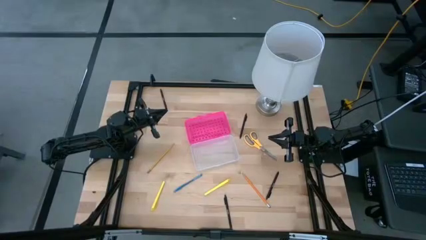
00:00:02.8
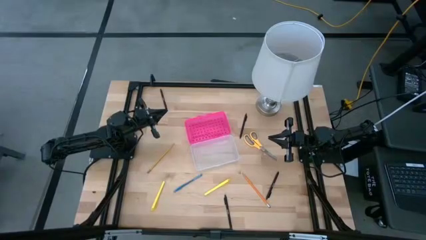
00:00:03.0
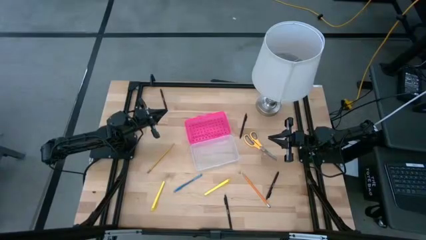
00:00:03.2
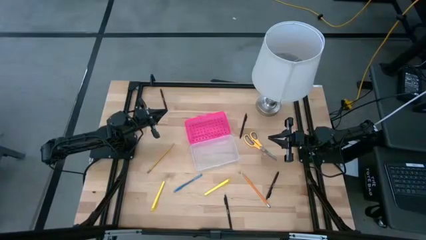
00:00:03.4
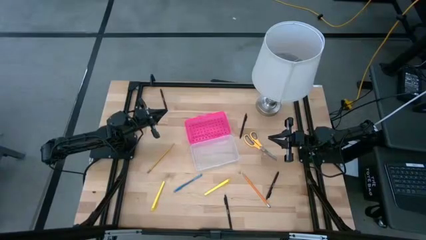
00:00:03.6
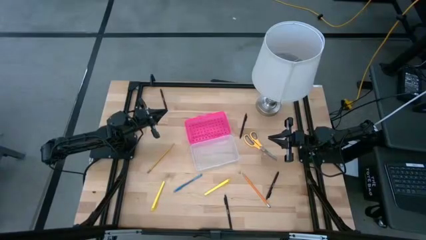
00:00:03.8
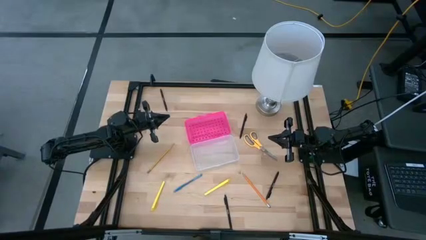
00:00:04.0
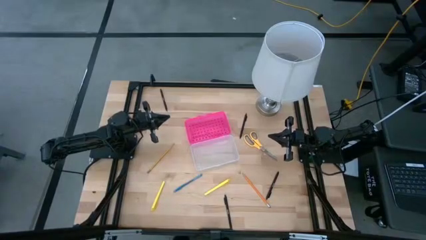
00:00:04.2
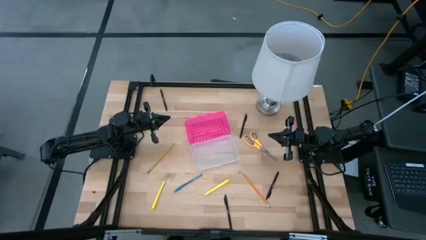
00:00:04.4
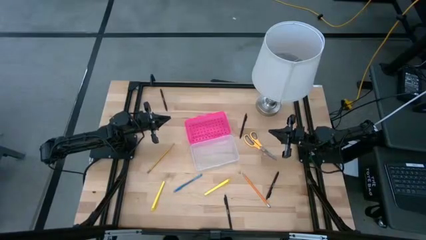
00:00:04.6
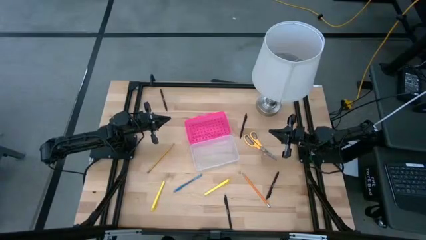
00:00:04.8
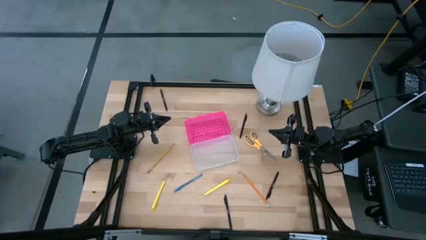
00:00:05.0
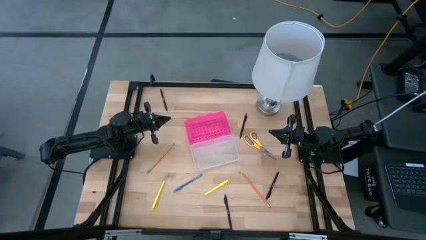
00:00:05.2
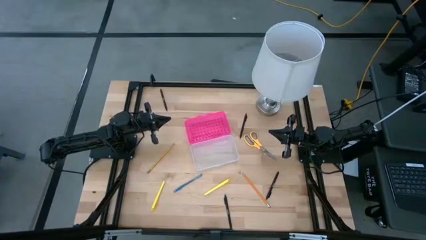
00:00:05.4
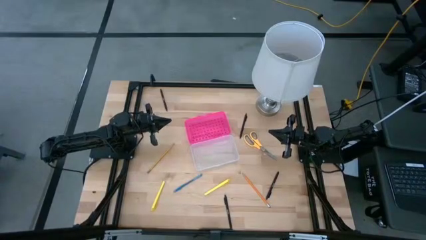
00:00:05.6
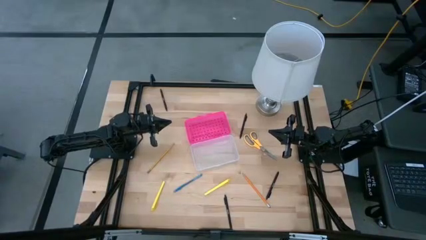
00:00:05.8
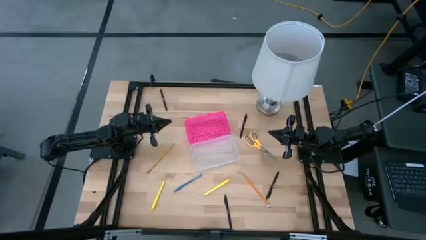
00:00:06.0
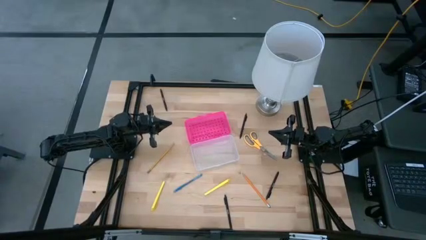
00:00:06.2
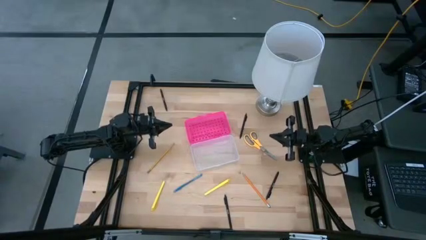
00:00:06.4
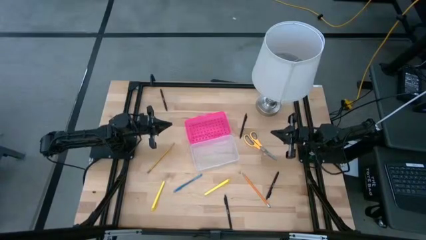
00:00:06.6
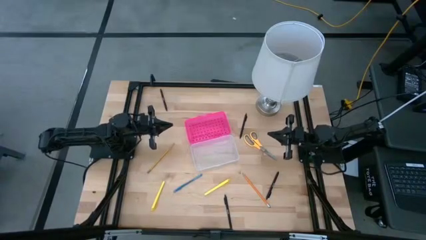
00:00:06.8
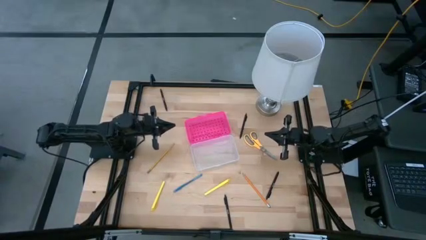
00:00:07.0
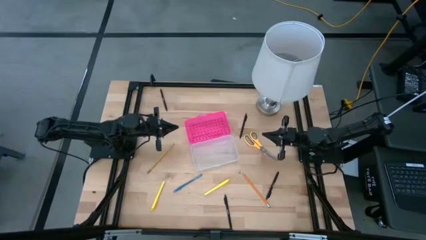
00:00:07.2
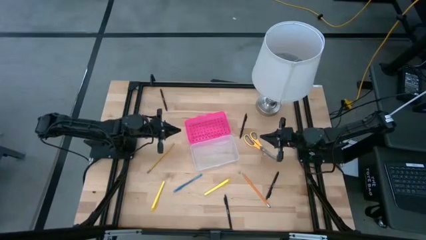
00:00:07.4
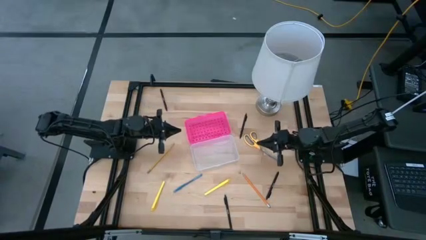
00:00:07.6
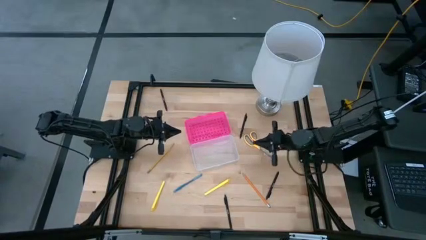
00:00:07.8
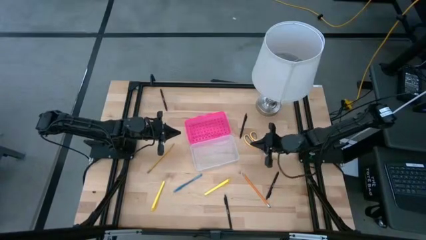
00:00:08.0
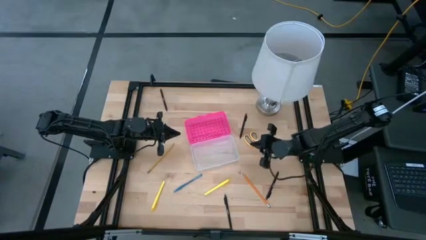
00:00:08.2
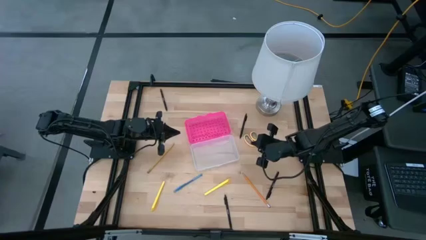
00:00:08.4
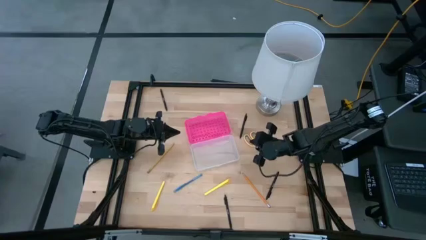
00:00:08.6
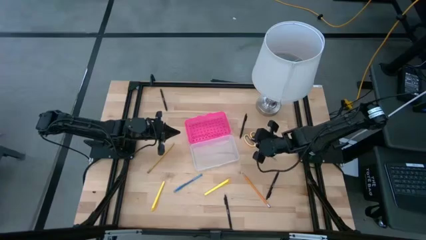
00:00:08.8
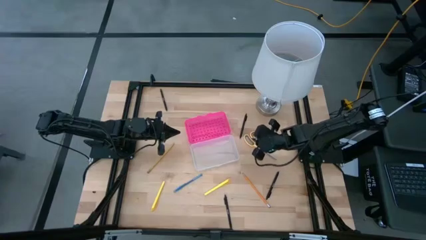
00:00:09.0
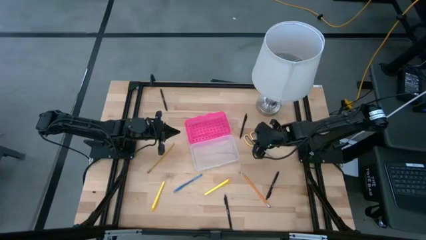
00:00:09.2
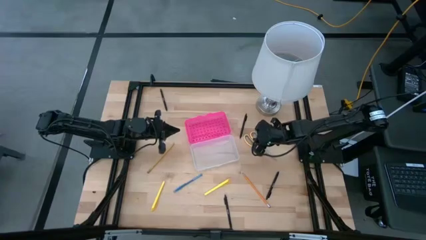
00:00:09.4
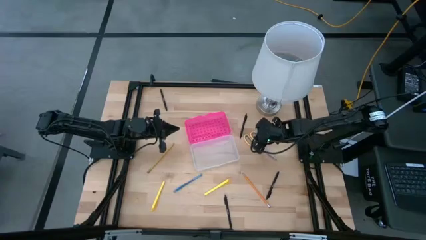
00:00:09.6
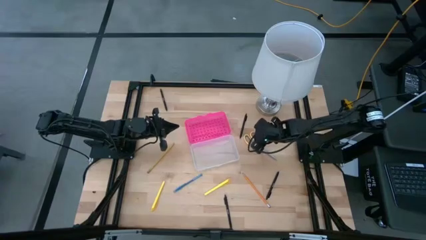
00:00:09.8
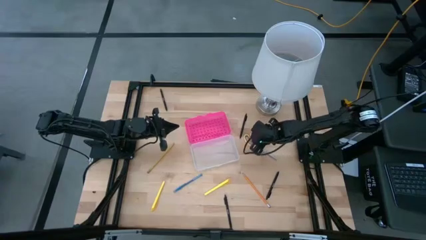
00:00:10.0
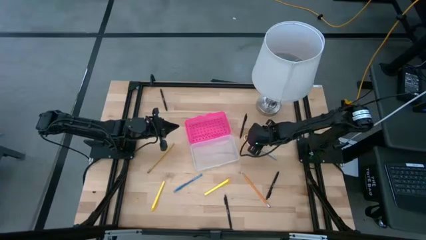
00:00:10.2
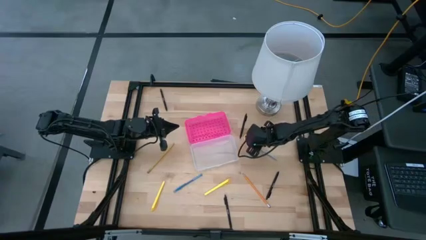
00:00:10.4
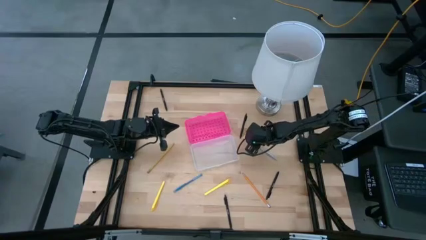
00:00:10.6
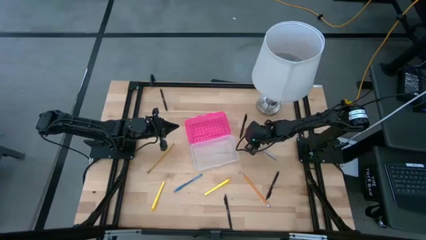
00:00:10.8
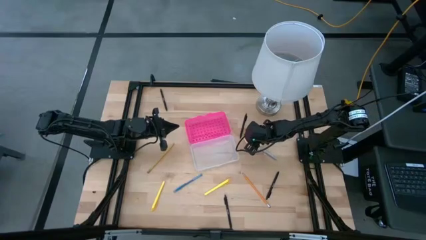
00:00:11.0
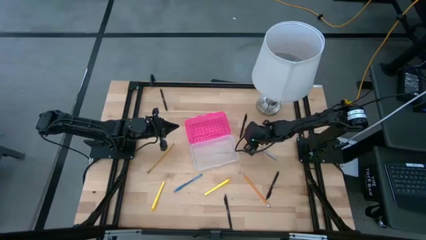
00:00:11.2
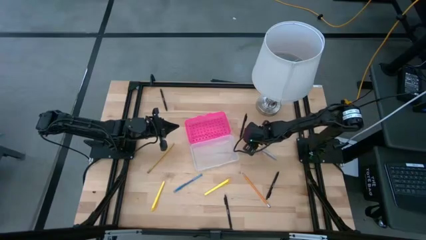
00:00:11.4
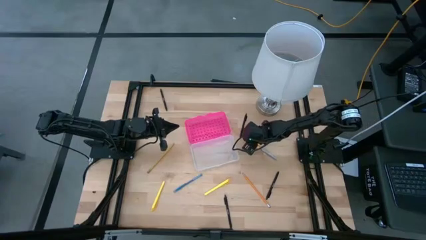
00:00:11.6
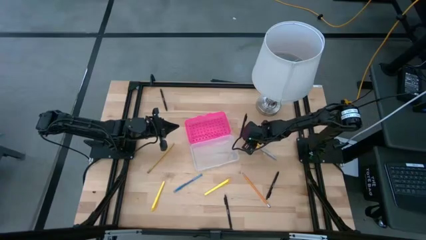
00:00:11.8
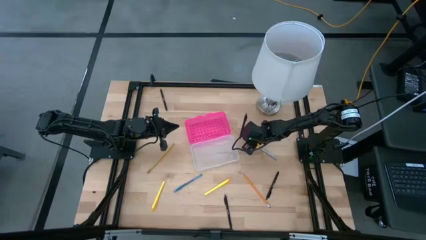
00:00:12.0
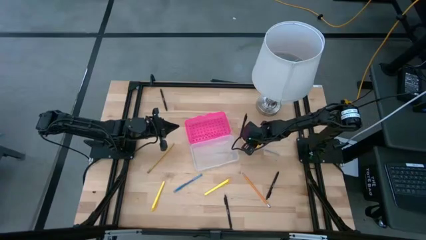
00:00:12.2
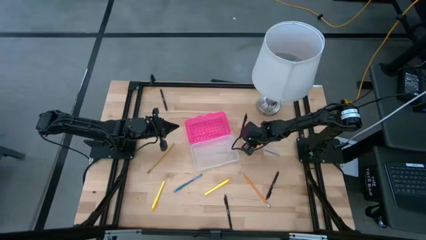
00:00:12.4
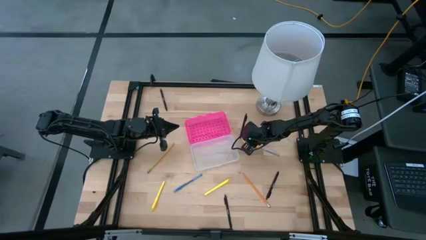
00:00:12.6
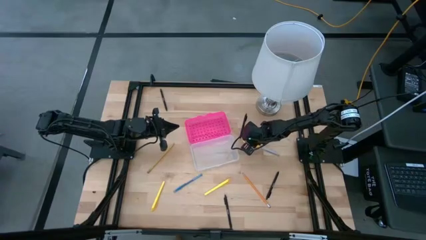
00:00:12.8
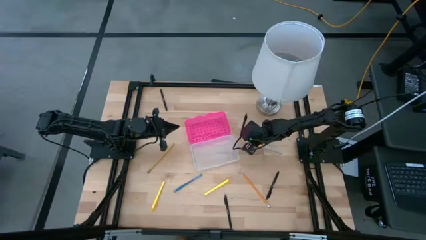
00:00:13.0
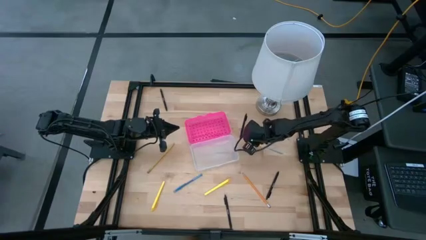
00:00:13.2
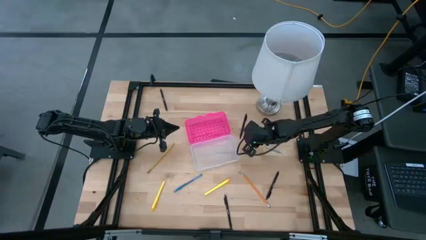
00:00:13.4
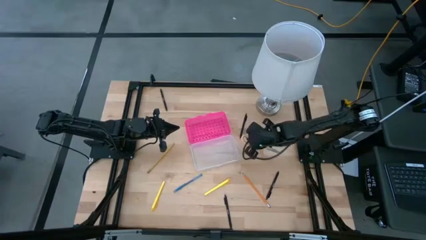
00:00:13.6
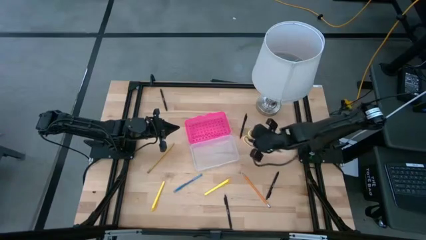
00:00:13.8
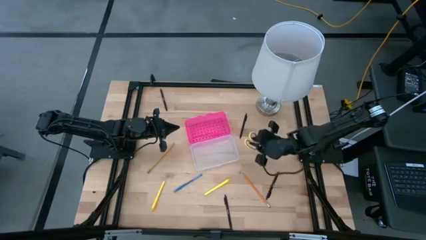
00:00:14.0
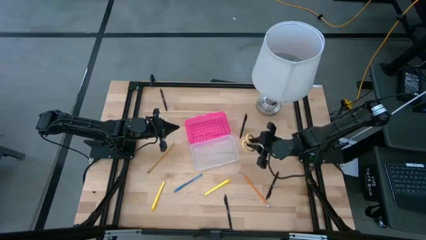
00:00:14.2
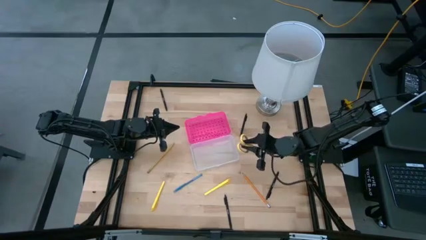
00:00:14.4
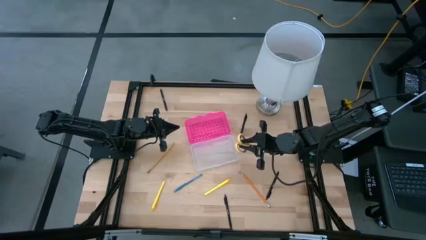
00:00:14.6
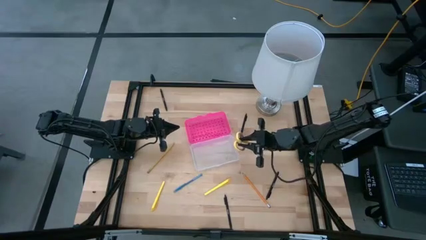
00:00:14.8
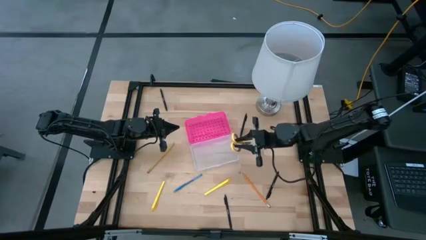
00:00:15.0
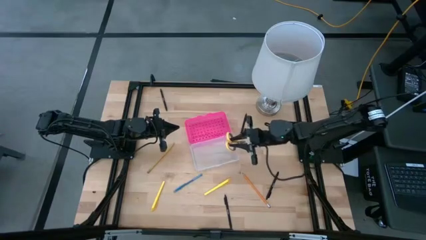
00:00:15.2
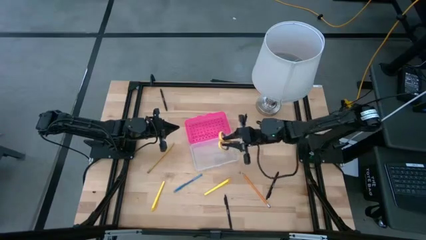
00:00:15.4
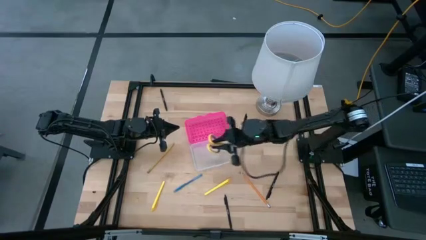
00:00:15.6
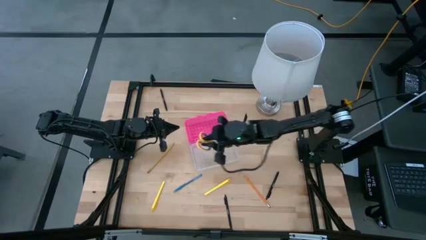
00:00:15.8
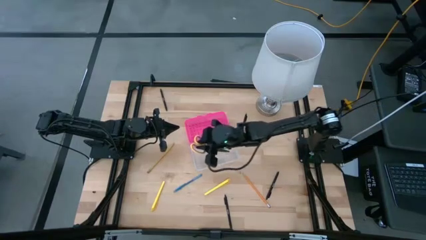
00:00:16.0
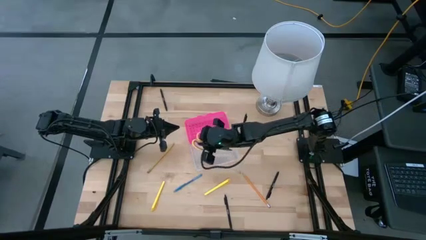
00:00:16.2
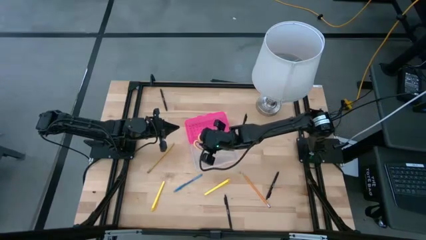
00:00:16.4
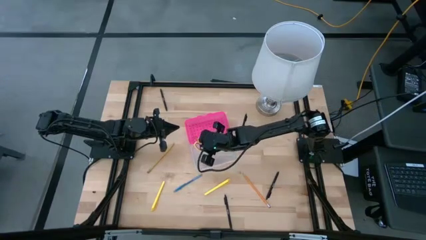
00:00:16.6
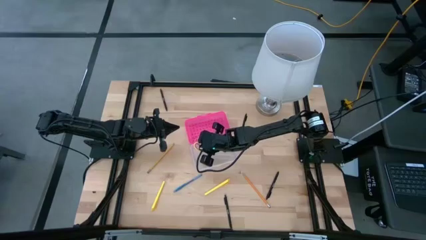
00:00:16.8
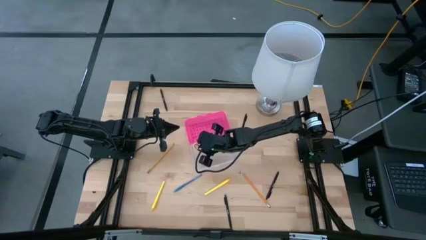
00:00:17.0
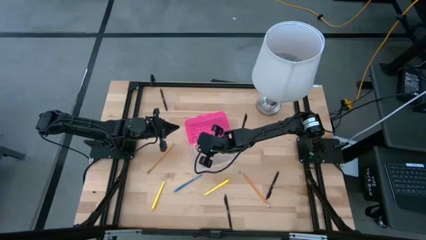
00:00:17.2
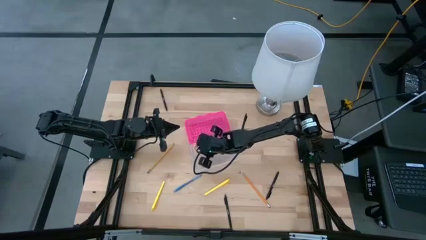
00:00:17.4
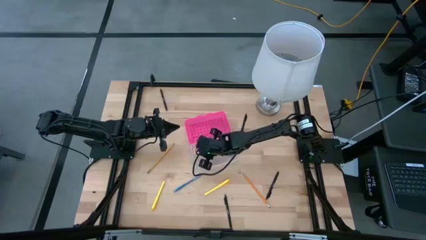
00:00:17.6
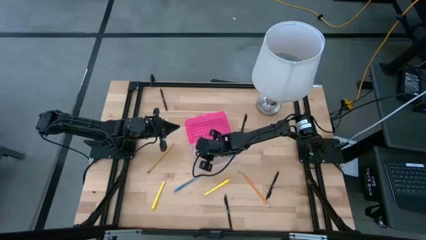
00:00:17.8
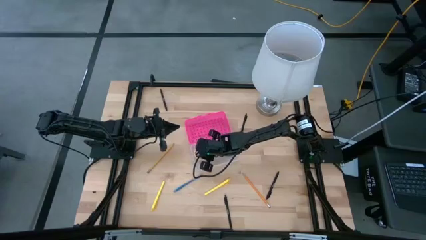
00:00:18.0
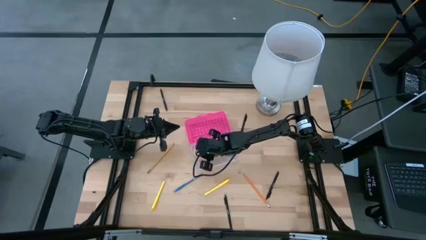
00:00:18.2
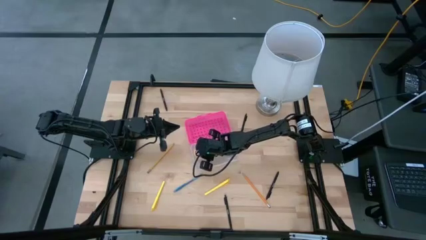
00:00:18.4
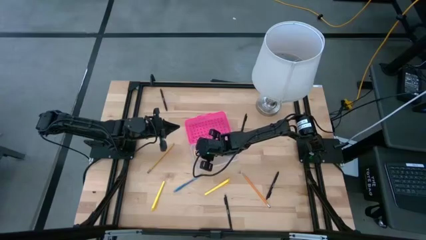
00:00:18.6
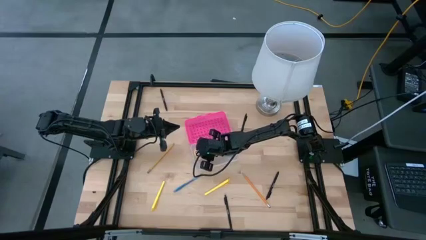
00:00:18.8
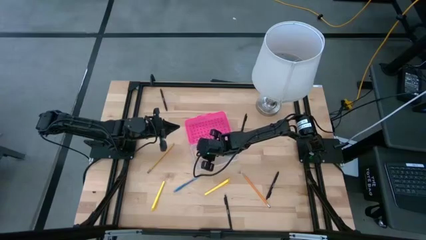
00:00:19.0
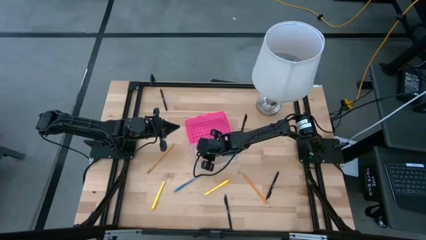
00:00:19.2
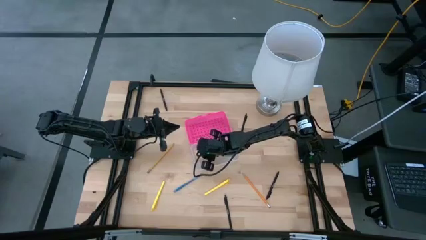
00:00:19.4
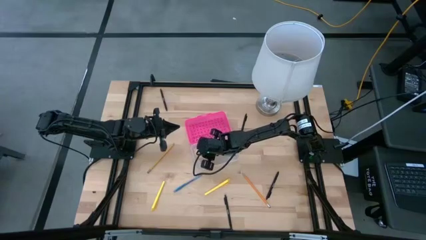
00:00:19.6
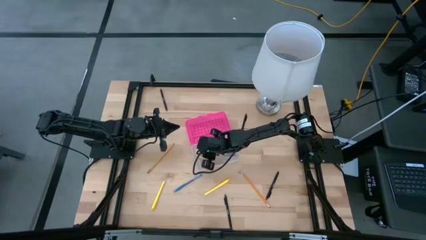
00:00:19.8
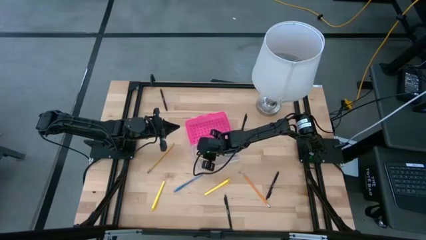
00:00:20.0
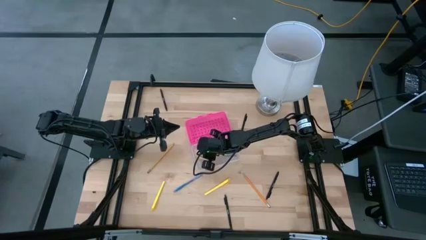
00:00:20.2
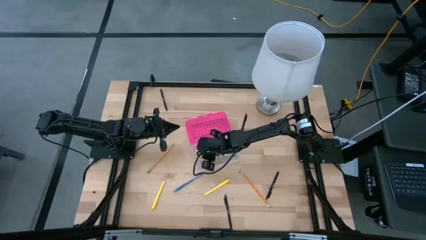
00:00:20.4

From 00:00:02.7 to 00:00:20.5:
Task: Pick & place school supplies into a supply box
Put the yellow scissors into the pink supply box
